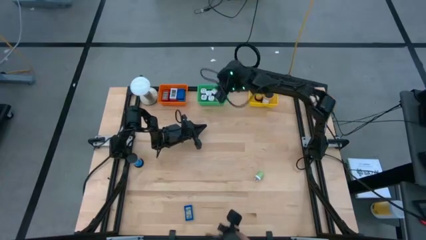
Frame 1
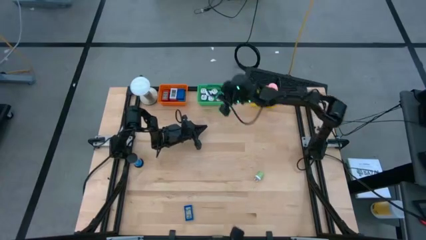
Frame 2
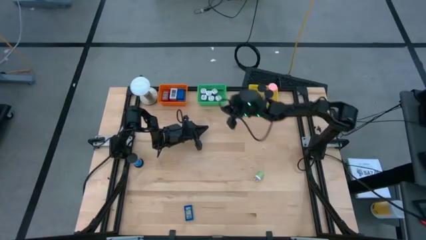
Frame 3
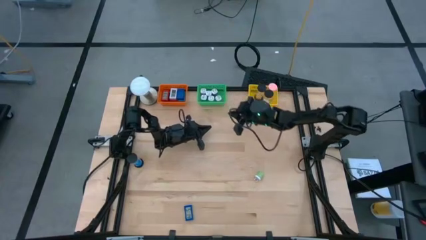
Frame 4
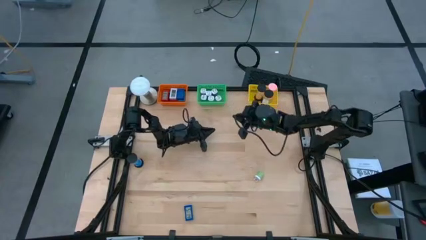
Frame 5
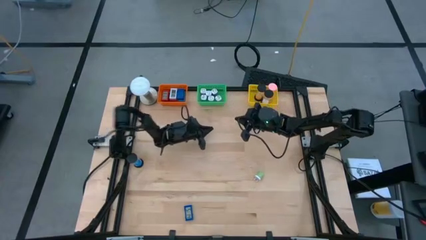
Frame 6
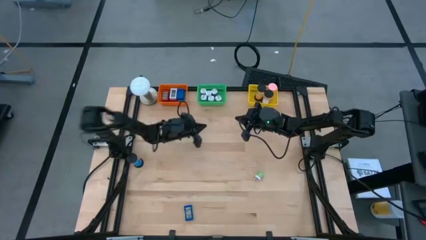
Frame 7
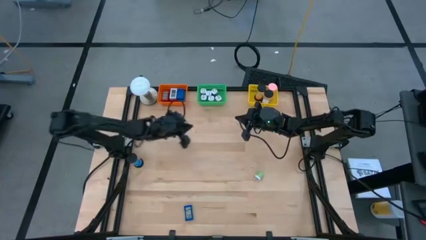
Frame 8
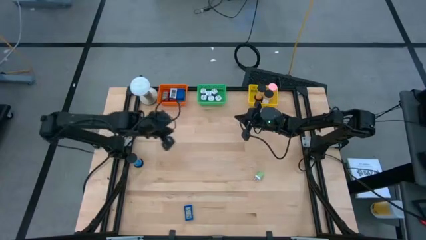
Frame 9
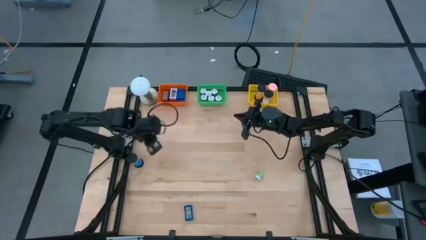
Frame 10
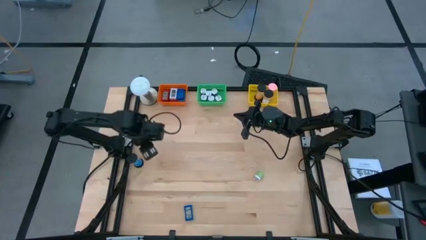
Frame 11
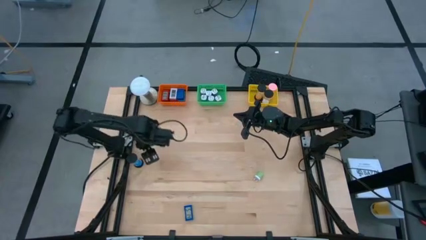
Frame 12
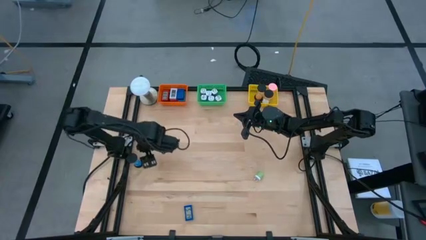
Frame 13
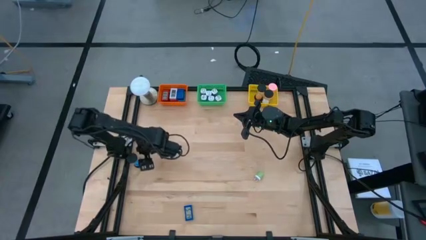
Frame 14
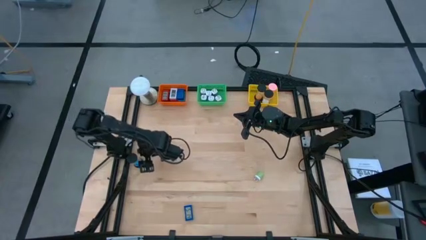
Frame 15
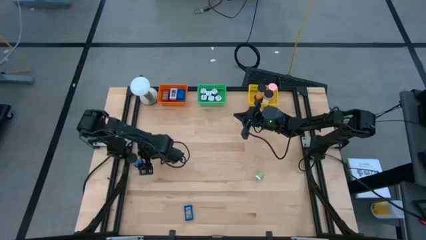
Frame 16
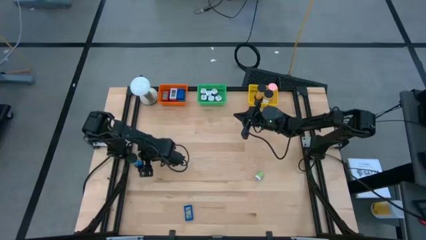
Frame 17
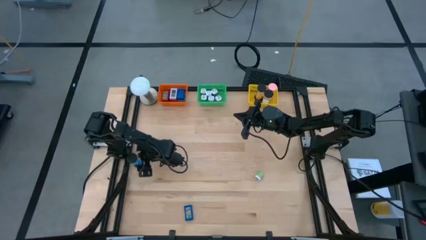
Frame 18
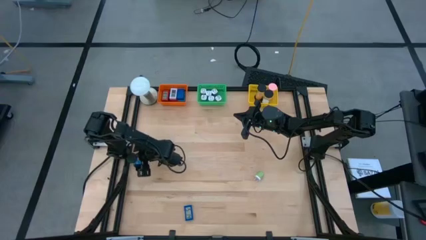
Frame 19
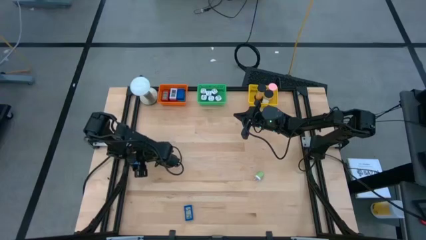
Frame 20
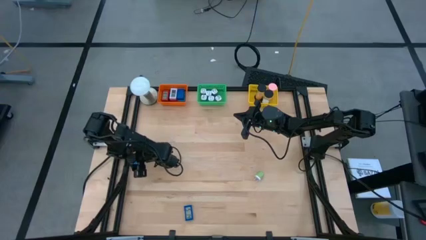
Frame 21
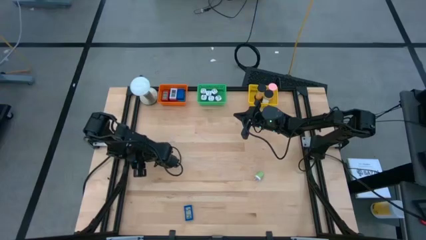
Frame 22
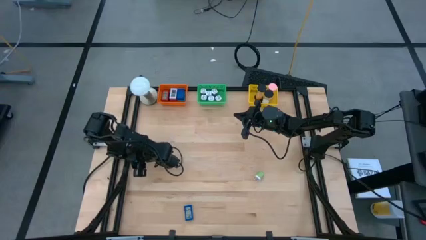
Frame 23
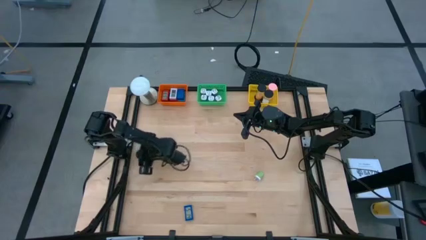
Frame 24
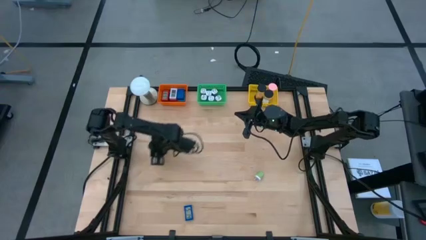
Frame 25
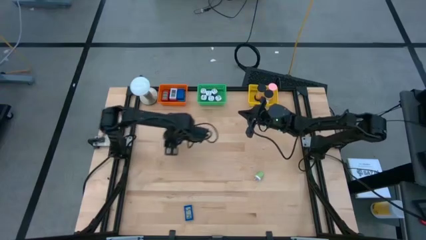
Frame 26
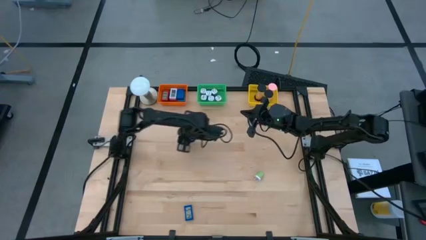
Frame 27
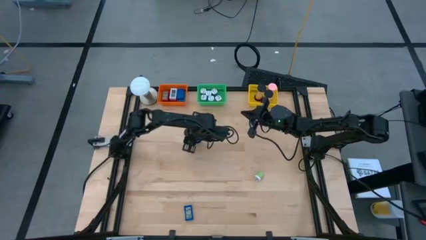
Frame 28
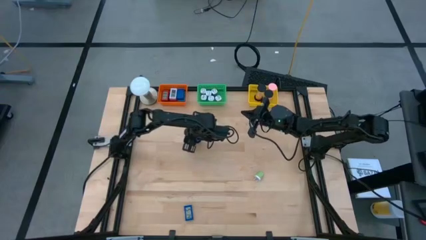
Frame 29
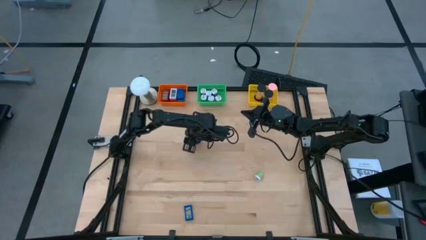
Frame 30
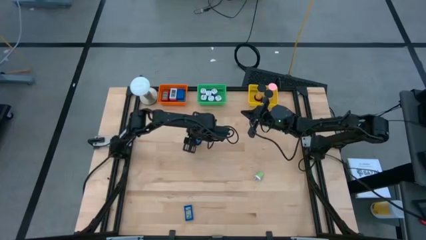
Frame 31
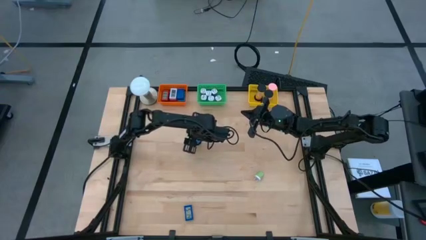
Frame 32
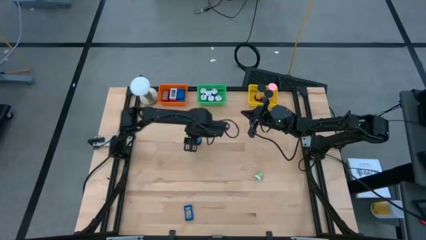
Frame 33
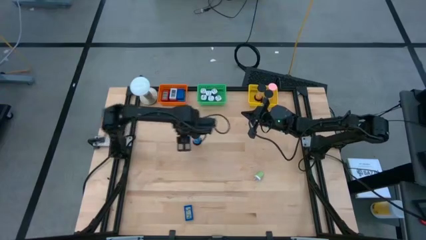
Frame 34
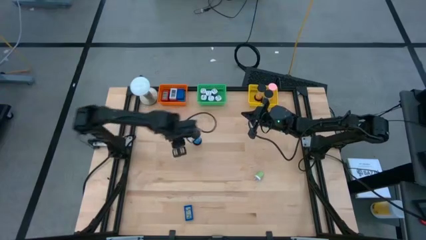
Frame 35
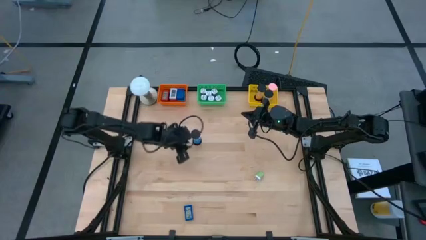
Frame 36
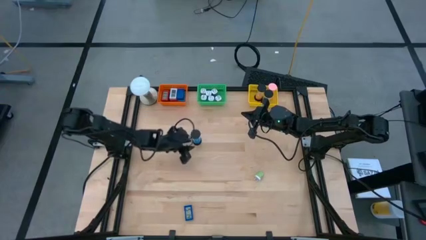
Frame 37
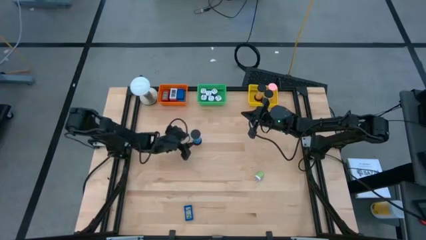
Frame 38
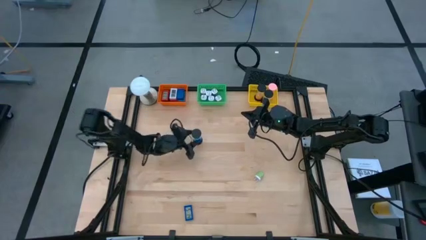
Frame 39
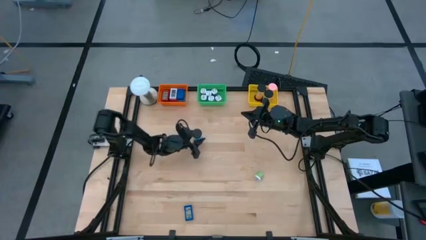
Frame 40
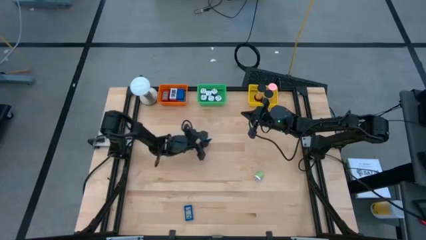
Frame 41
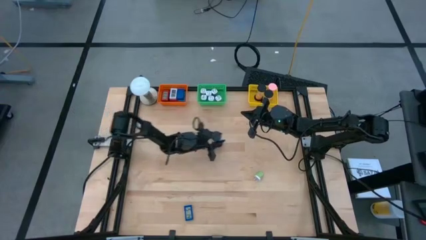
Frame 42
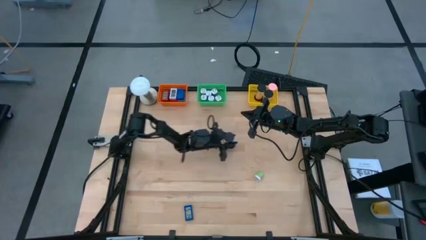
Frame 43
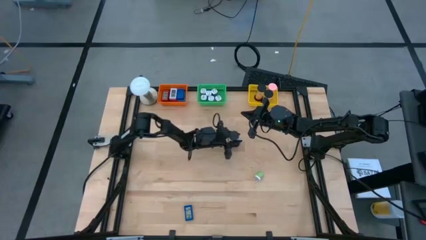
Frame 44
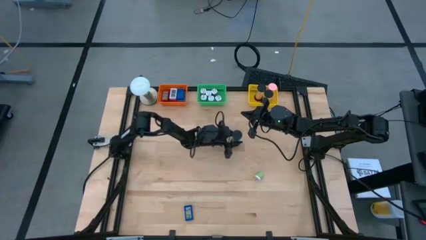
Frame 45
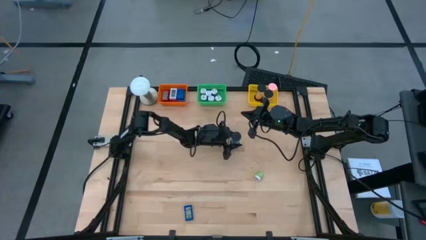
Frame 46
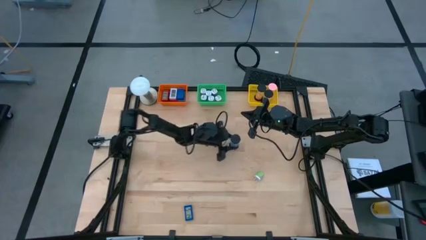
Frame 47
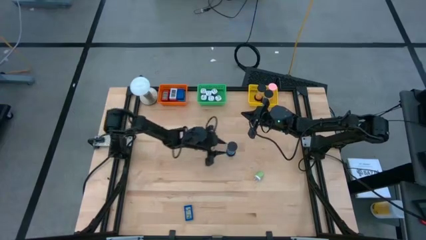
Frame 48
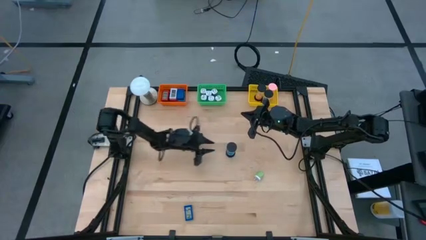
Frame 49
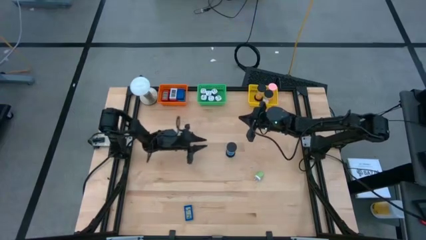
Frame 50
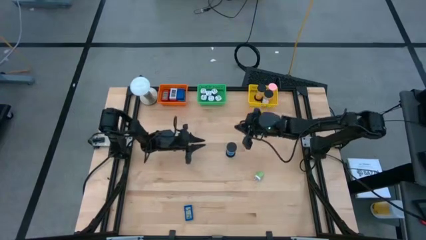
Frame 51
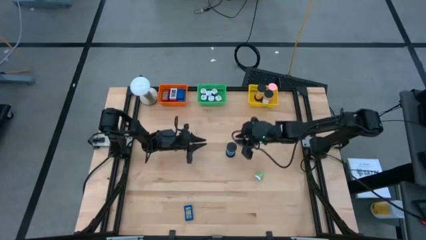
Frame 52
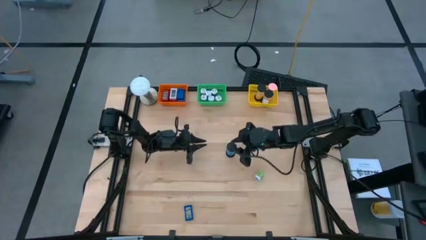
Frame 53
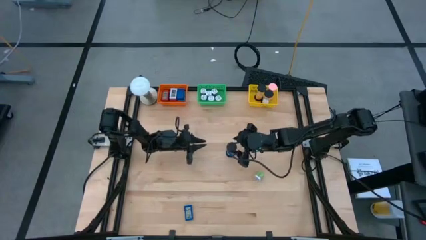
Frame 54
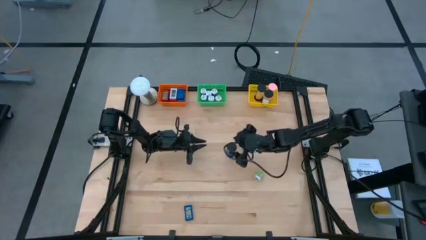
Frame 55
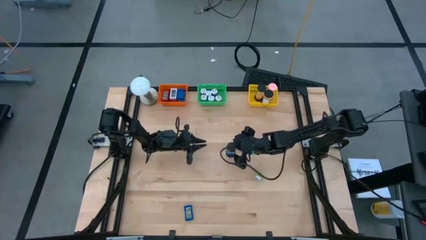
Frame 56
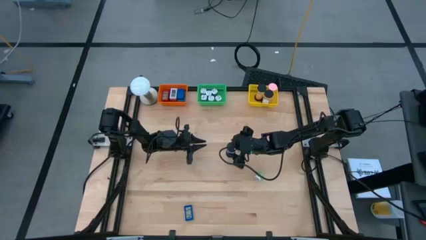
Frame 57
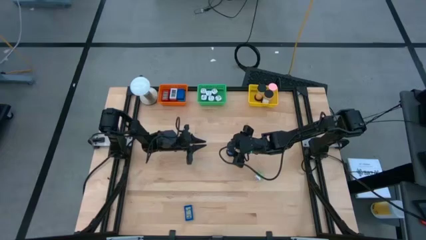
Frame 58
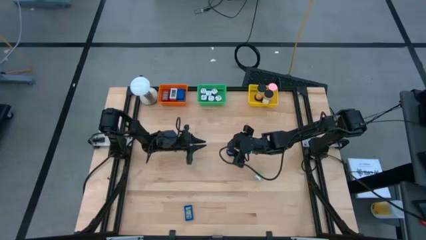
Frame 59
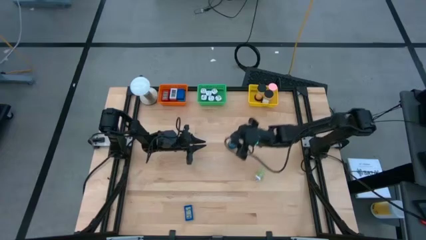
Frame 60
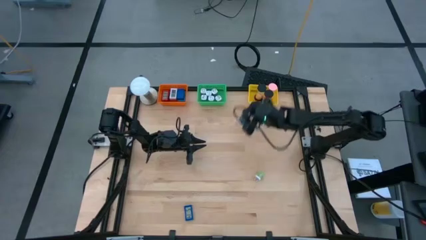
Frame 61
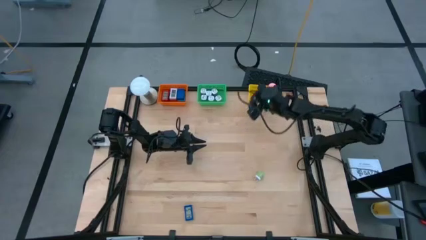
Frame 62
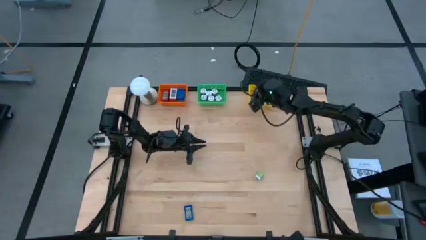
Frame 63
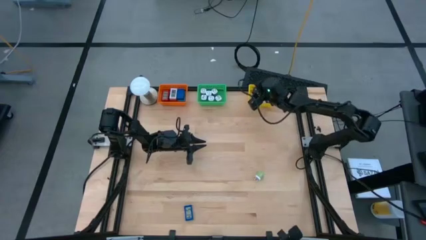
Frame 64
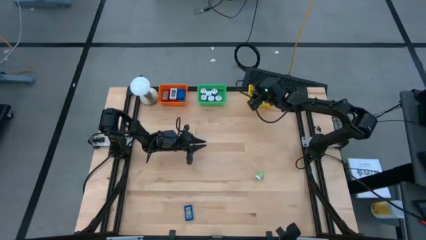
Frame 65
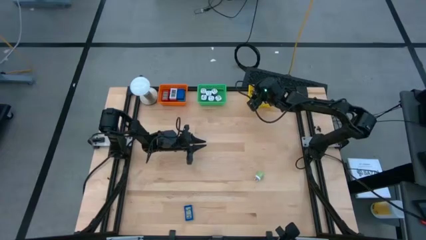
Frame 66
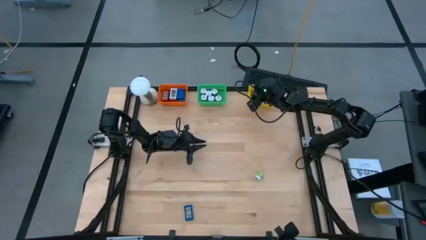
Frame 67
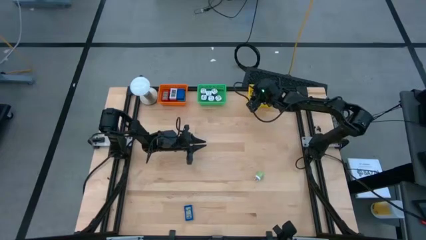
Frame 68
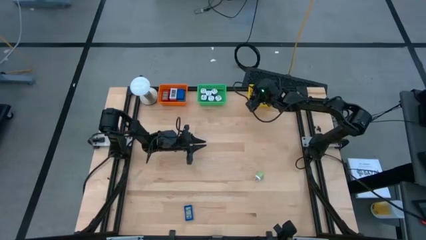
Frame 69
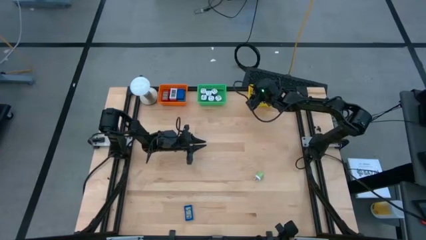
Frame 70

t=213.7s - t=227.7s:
Task: Pick & Place Office items
Put the blue hourglass into the yellow basket

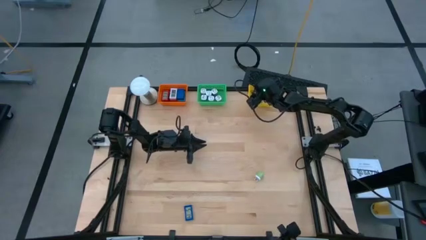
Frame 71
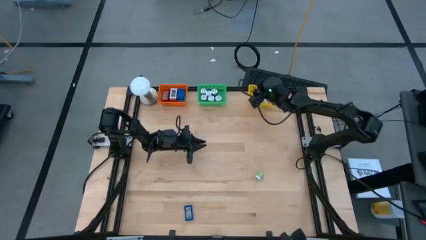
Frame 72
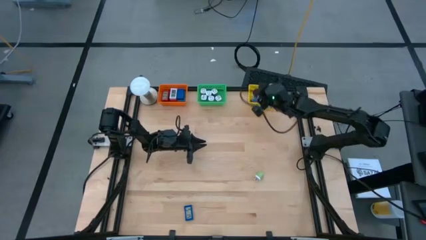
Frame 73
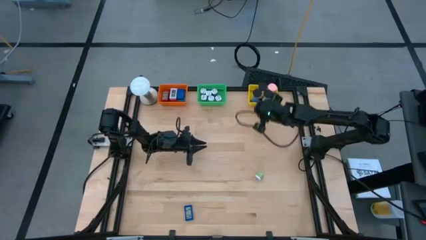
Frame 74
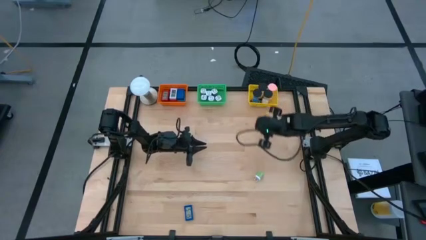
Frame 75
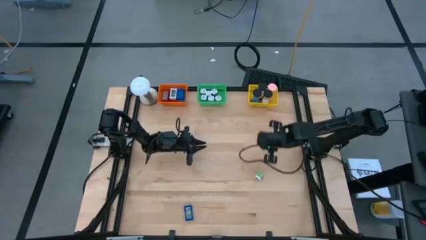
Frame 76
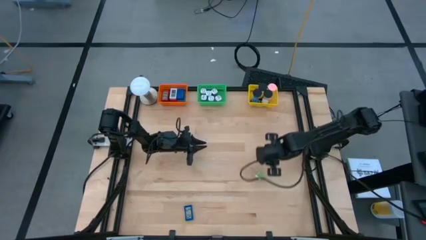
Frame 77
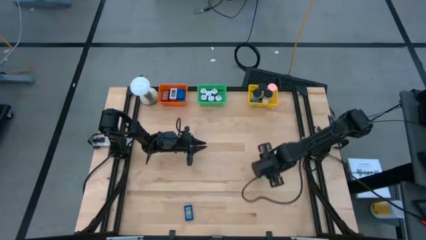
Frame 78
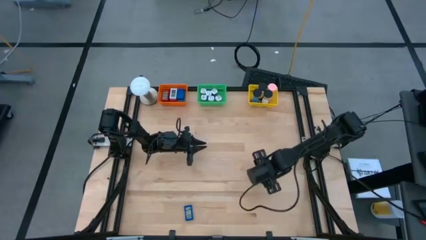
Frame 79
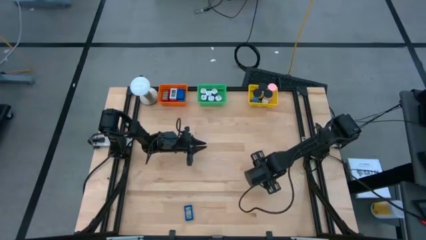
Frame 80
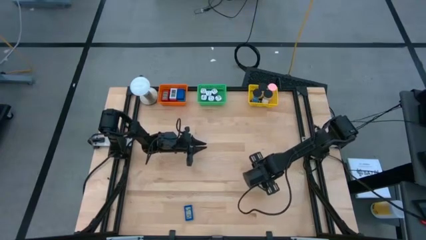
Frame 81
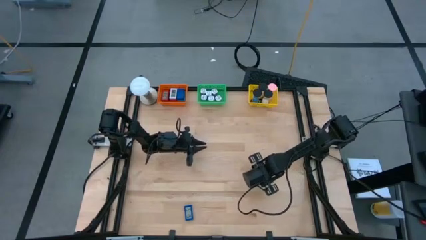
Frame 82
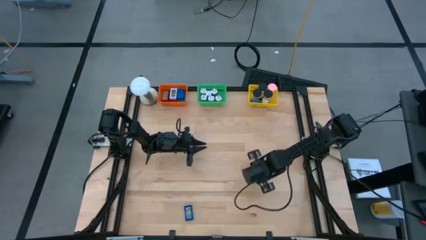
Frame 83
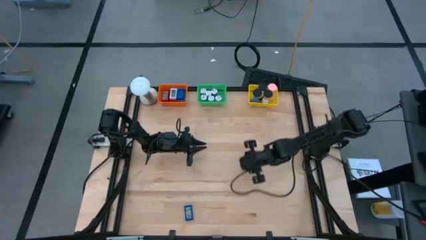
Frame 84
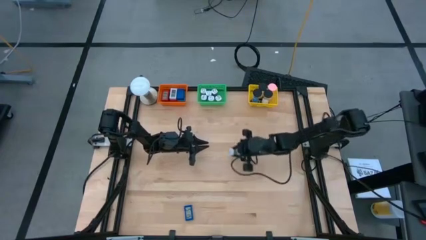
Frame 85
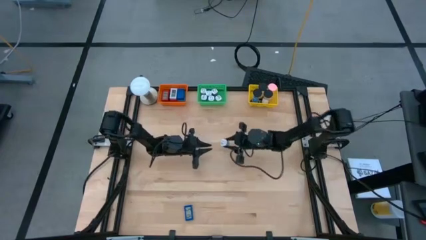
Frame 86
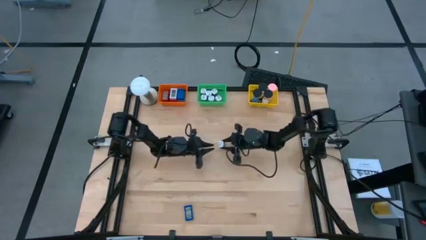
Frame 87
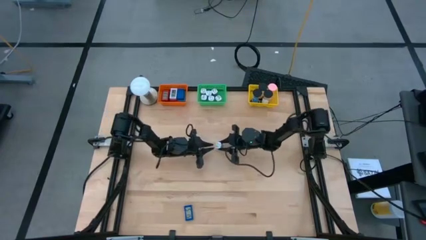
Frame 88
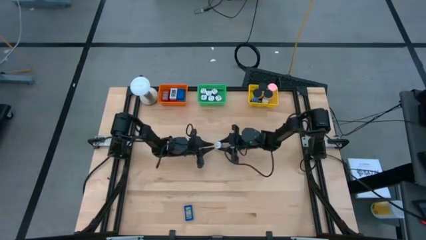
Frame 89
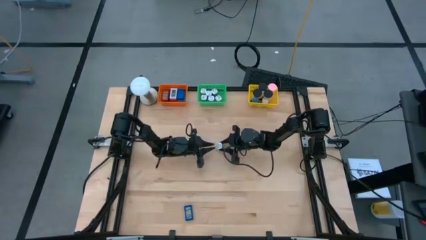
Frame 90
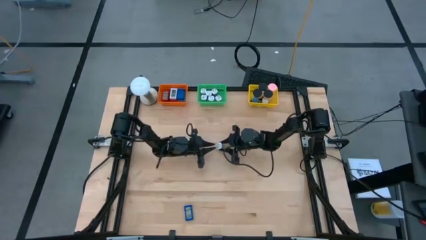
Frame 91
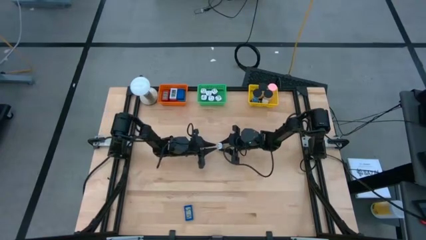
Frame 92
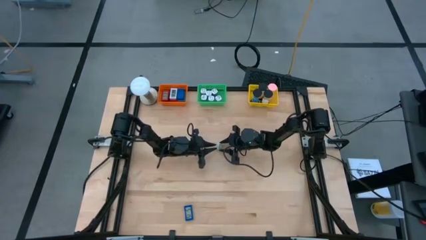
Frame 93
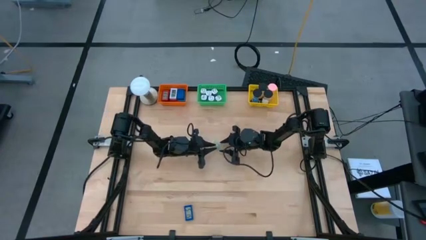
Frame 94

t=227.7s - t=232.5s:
Put the green charger adapter into the green basket
